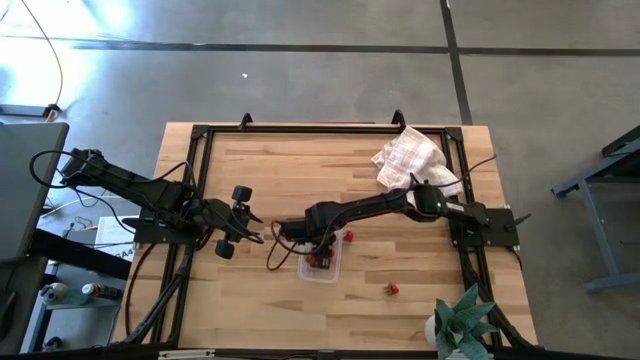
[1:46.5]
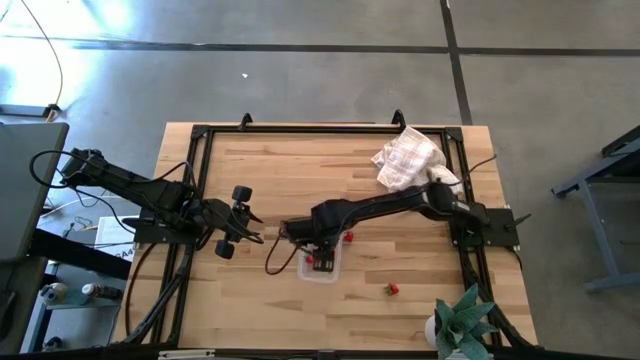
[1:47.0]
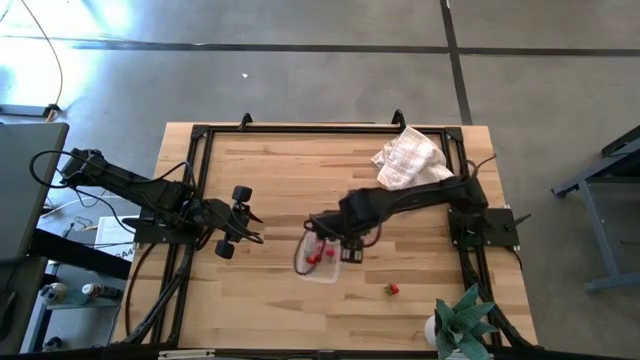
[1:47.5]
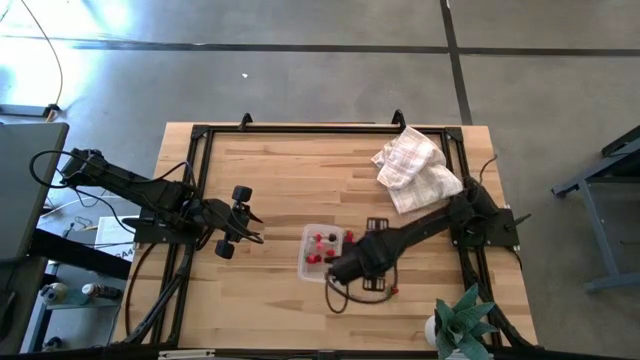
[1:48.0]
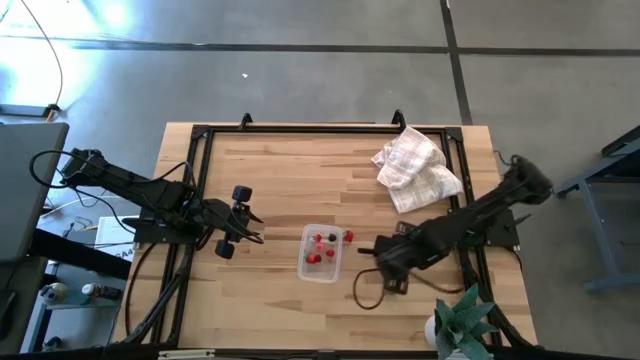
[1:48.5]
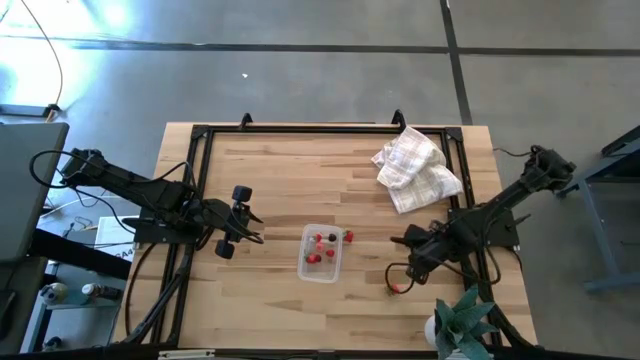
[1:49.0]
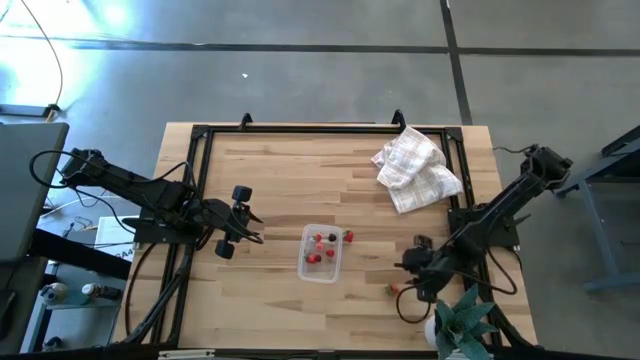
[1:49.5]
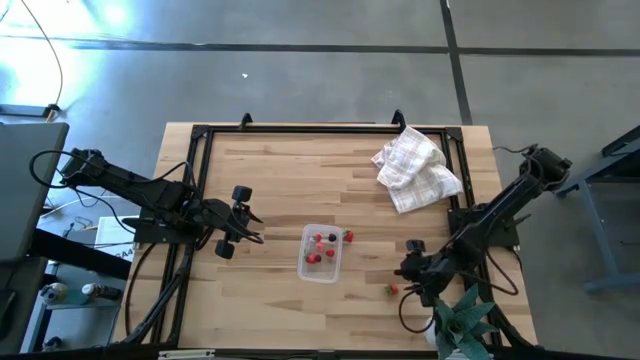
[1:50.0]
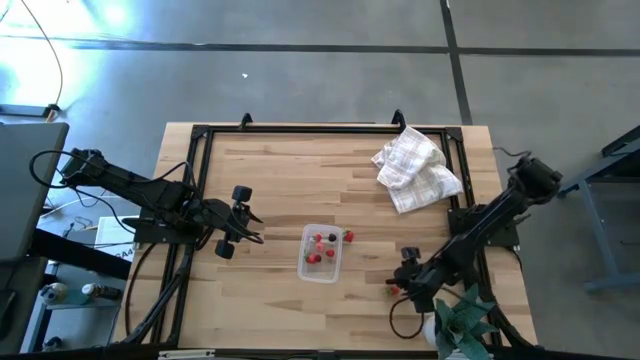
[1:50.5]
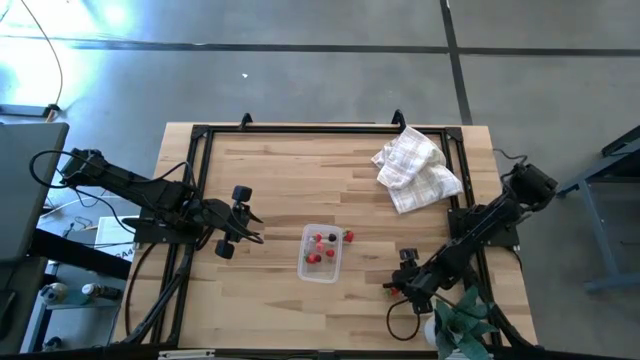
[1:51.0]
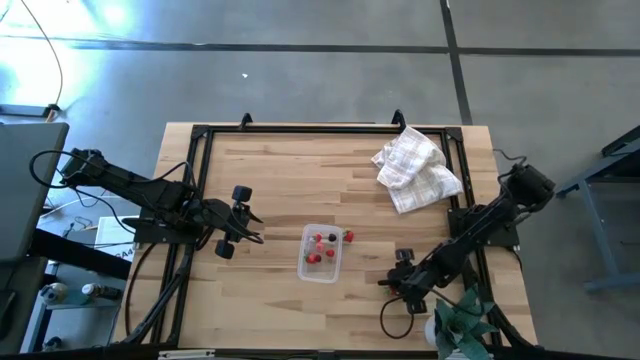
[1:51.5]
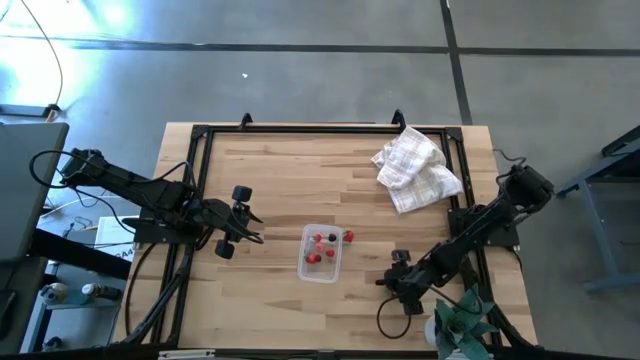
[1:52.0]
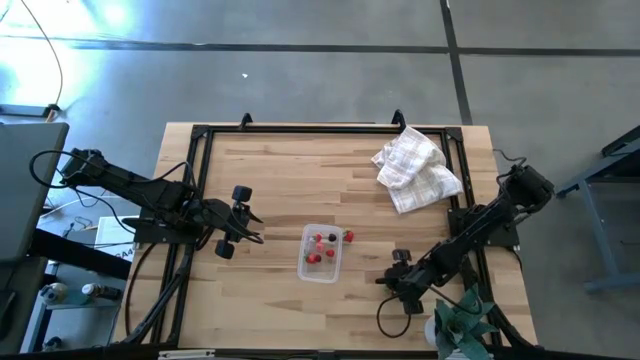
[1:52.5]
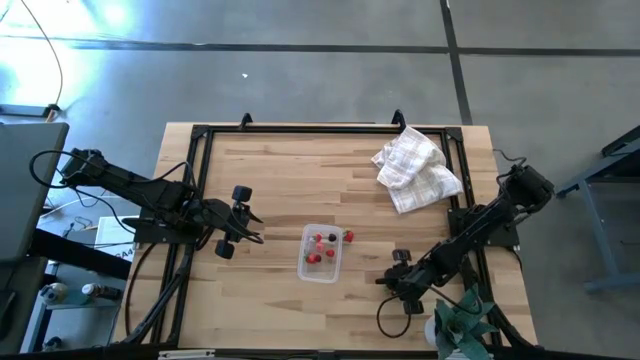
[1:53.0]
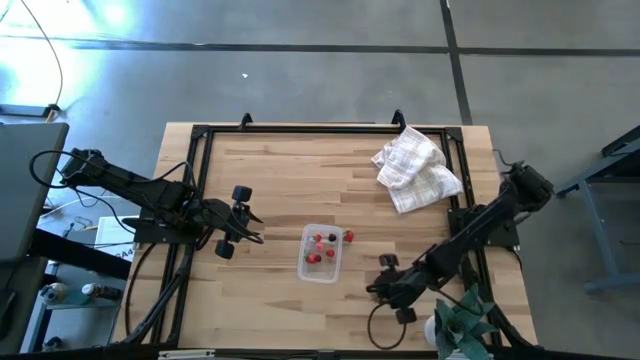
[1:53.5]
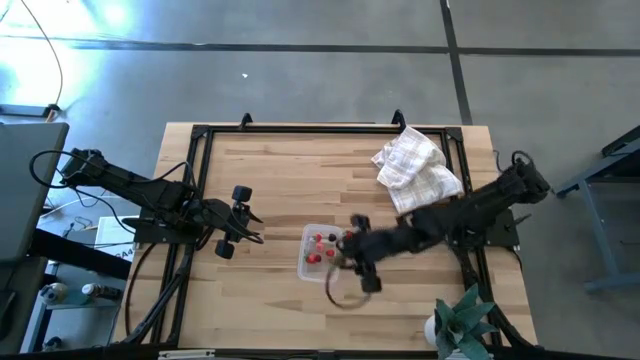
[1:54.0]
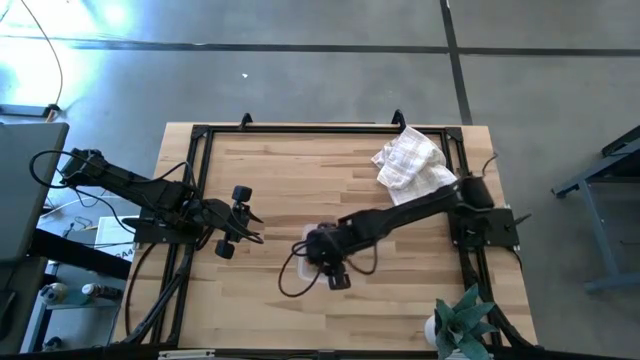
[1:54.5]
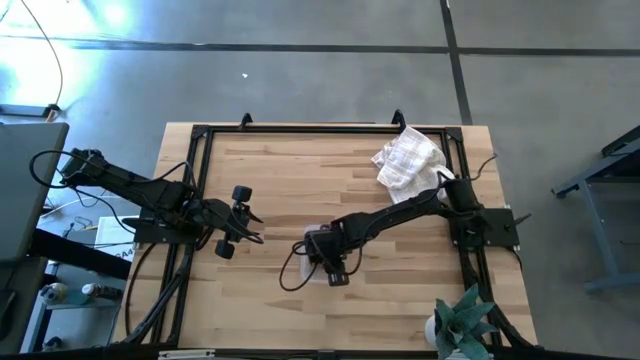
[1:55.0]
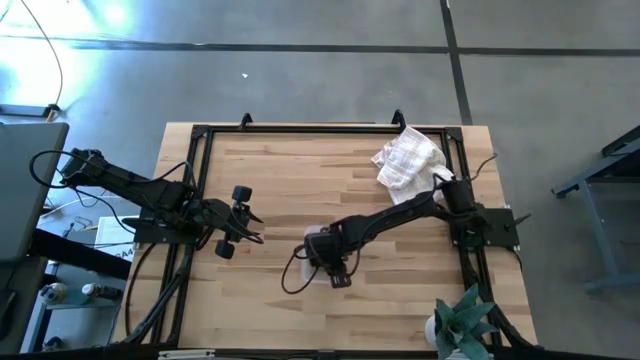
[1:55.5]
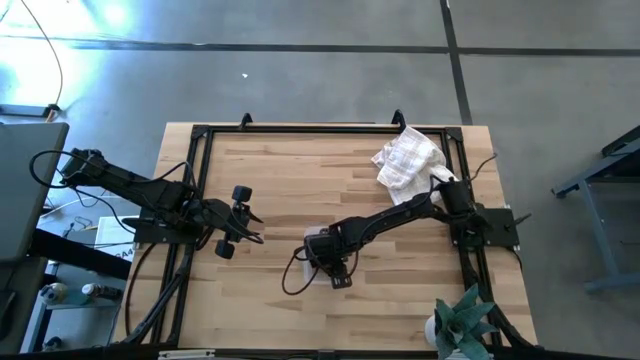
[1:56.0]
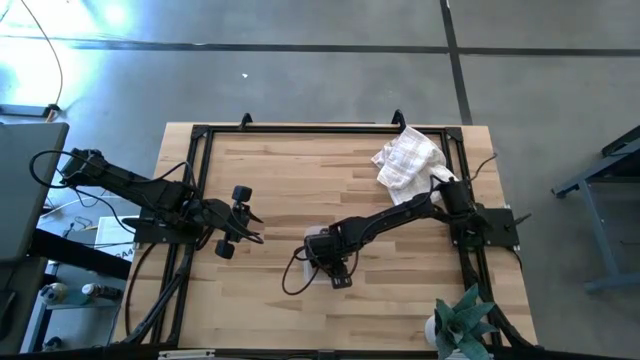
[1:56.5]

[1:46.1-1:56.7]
Task: Pick and placing Produce into tupperware
Put the red strawberry into the transparent container

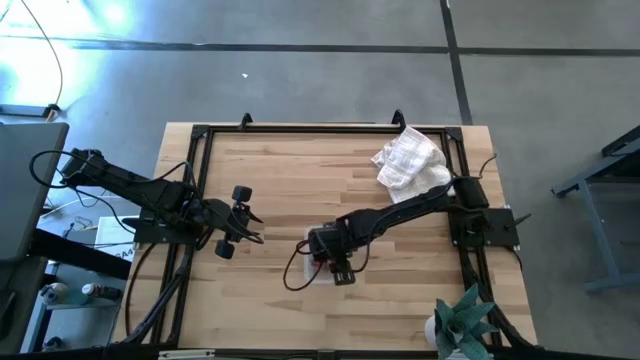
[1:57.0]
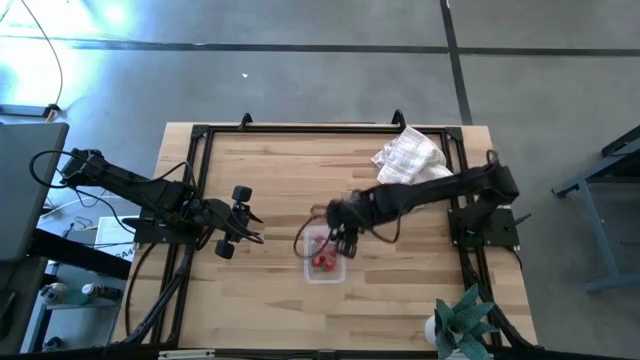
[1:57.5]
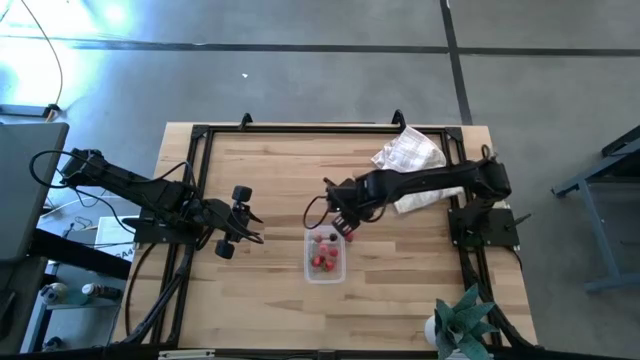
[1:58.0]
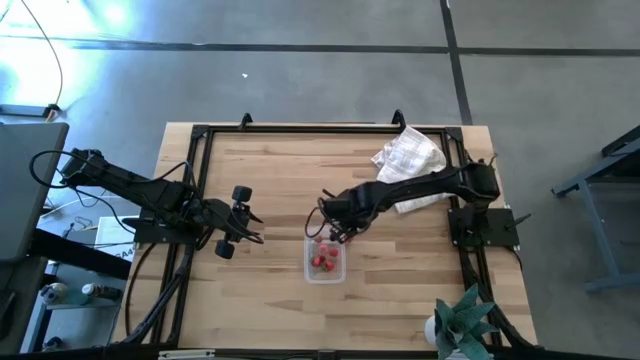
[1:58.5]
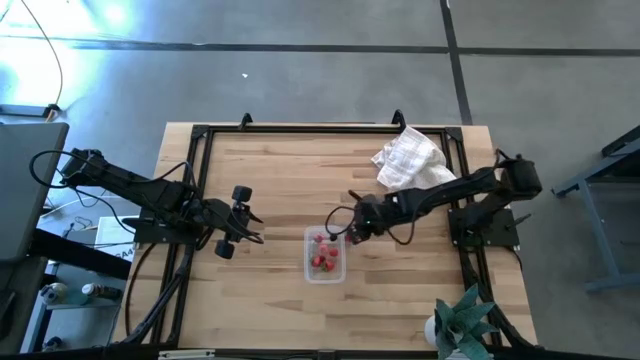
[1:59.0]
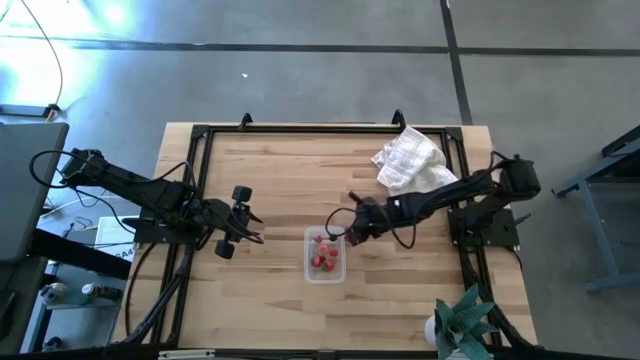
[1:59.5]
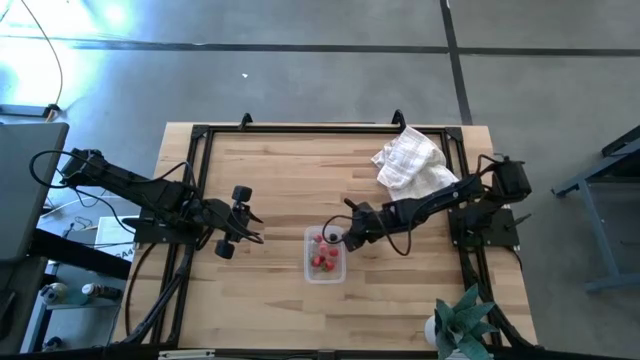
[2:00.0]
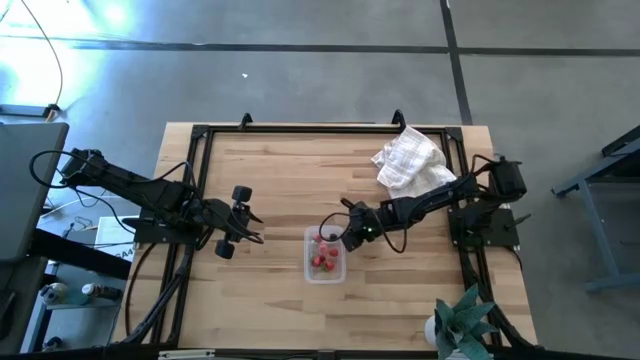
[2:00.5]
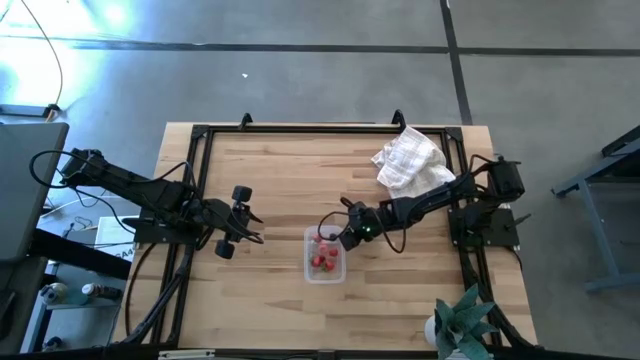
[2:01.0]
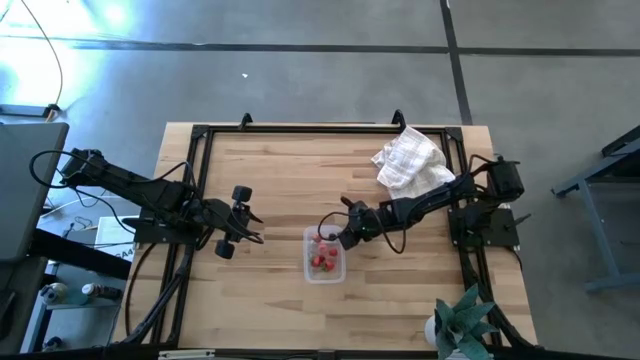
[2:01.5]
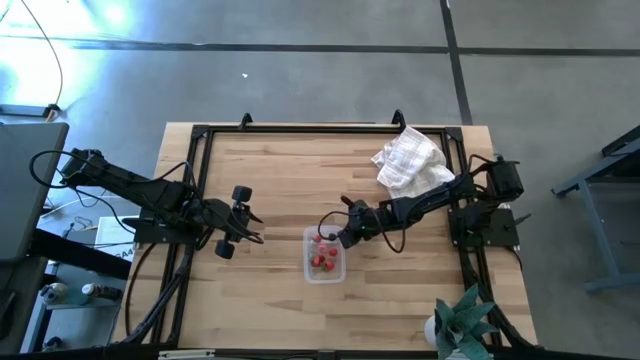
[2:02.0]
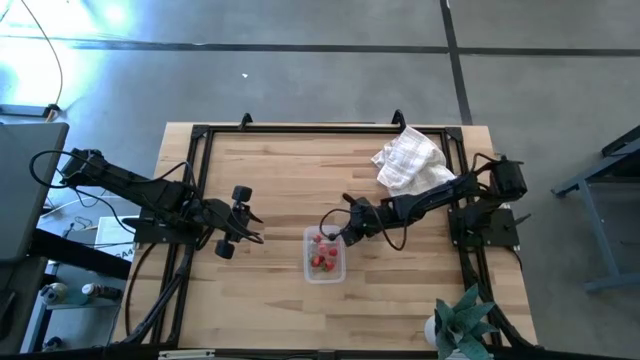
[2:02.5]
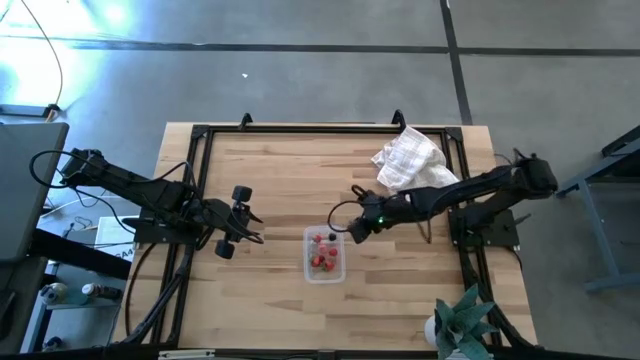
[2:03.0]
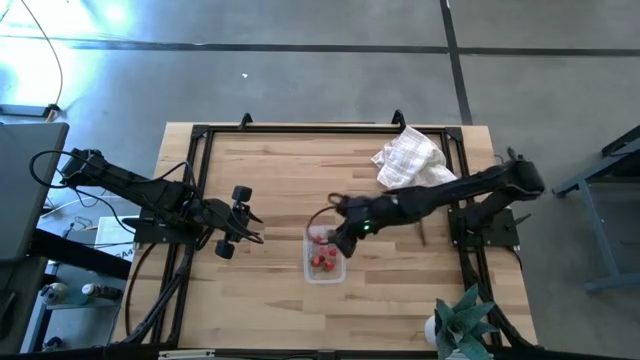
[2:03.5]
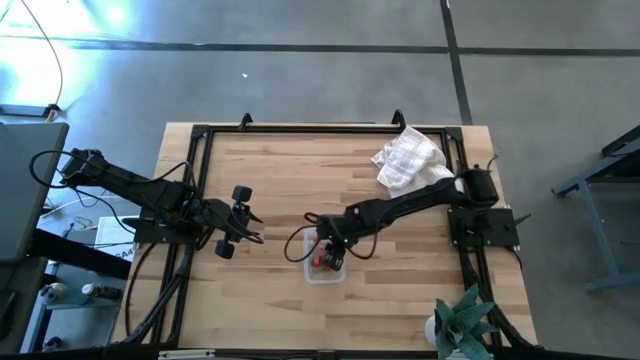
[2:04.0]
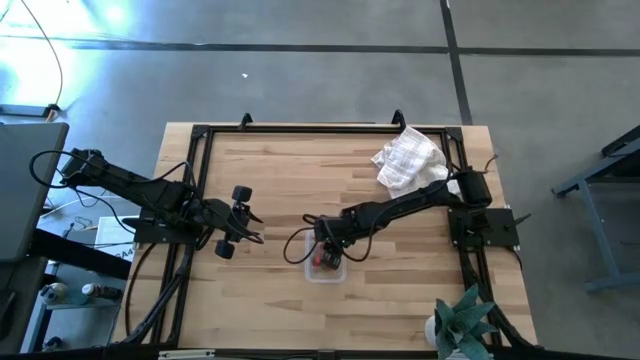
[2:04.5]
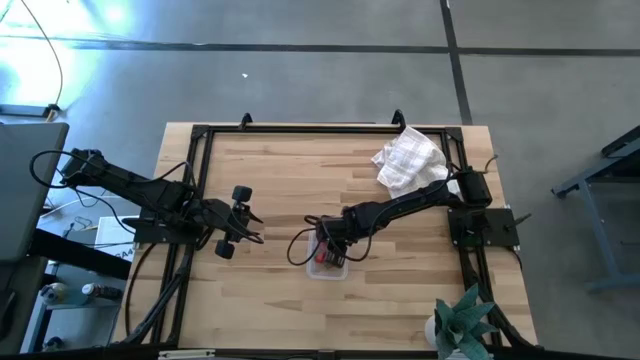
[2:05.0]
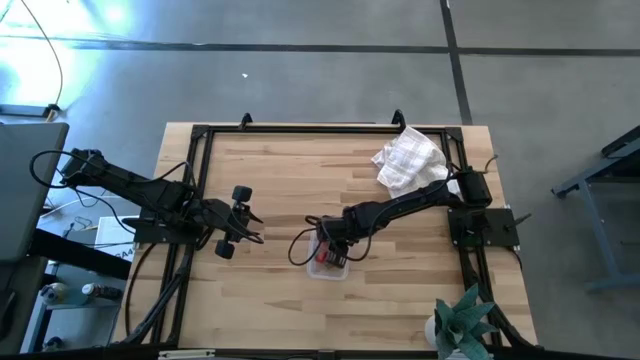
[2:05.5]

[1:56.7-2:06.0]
Put the red strawberry into the transparent container
